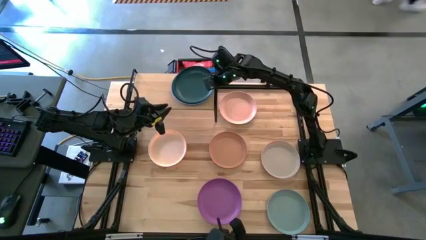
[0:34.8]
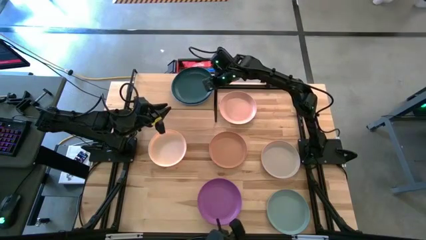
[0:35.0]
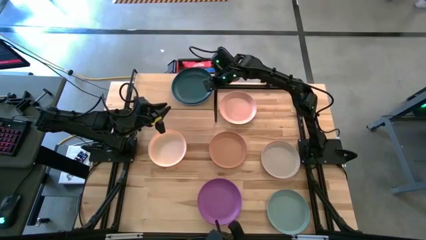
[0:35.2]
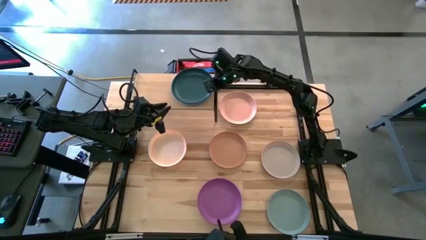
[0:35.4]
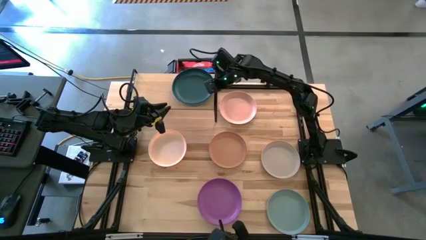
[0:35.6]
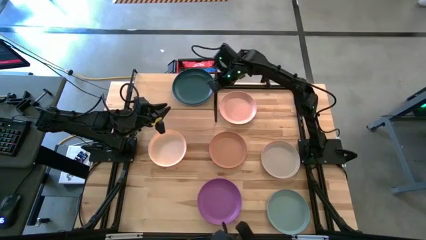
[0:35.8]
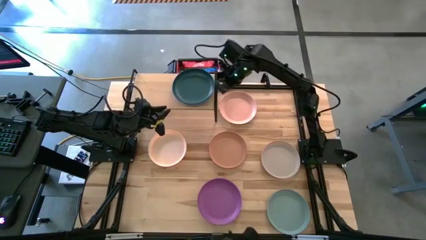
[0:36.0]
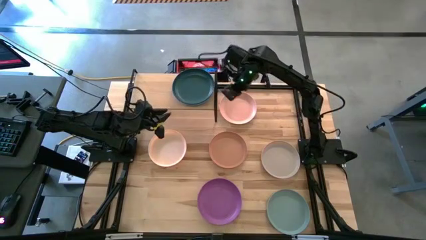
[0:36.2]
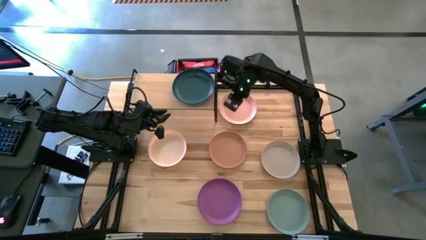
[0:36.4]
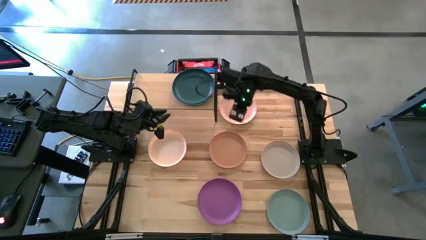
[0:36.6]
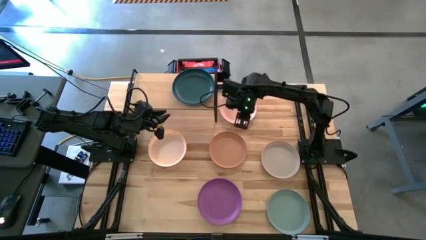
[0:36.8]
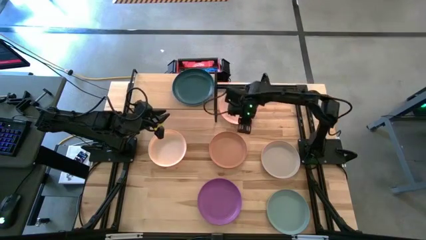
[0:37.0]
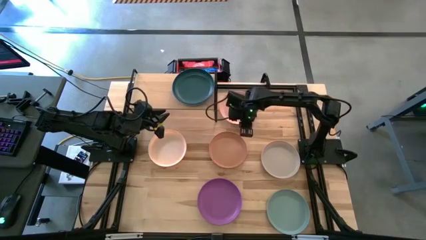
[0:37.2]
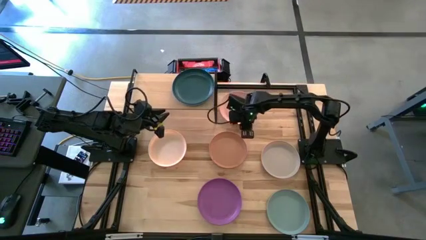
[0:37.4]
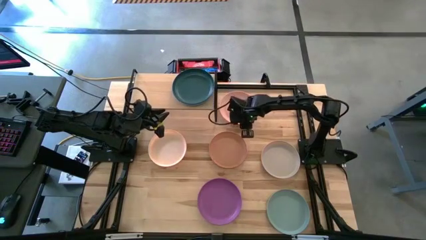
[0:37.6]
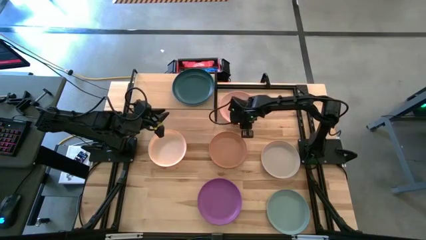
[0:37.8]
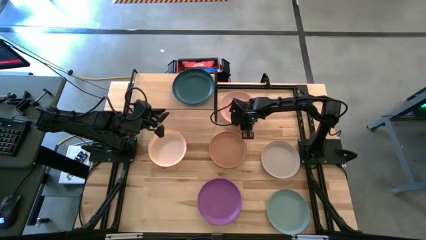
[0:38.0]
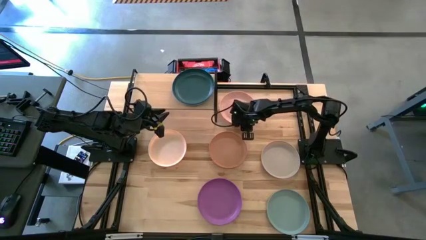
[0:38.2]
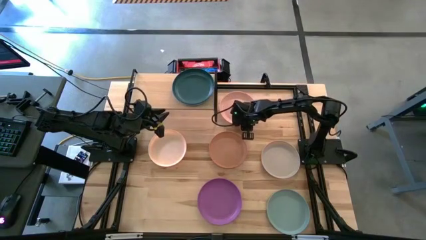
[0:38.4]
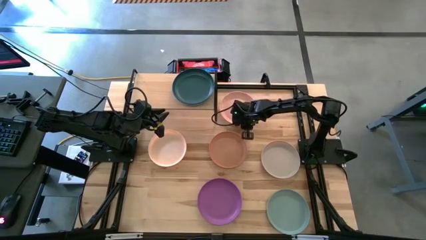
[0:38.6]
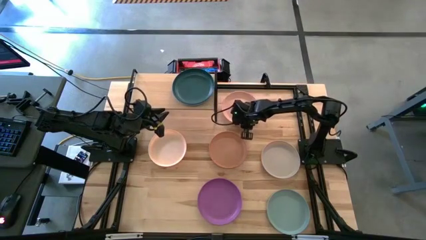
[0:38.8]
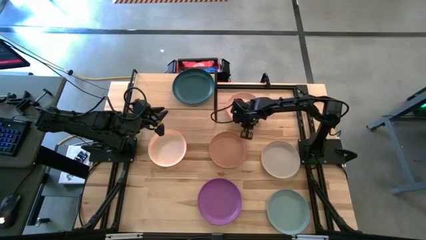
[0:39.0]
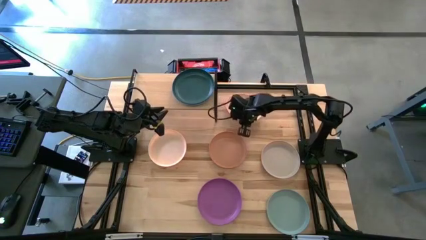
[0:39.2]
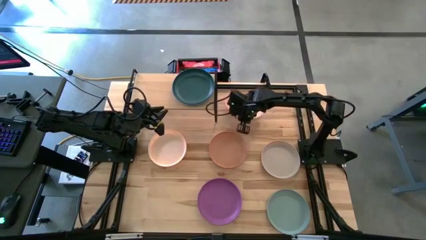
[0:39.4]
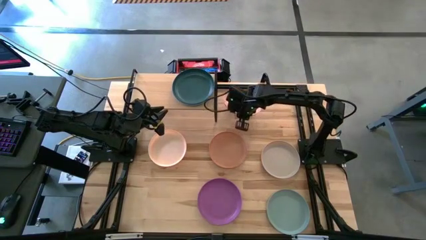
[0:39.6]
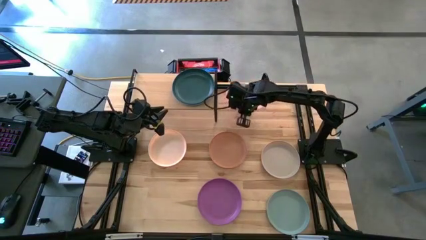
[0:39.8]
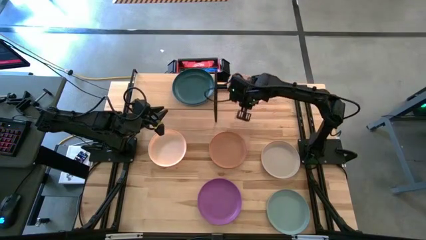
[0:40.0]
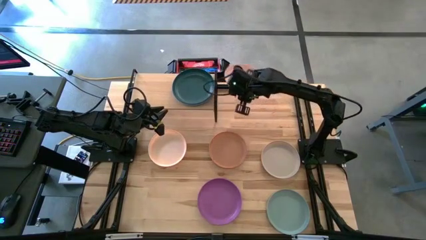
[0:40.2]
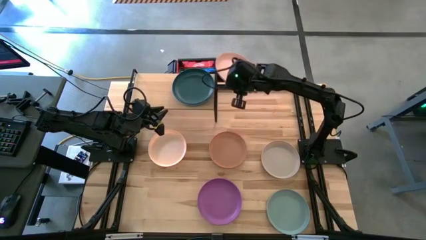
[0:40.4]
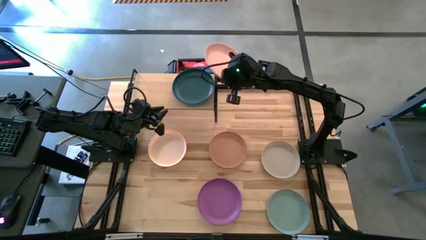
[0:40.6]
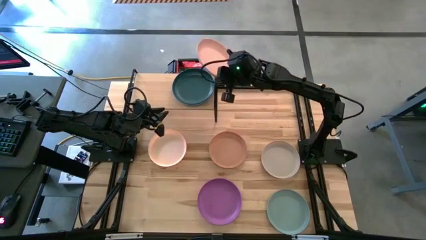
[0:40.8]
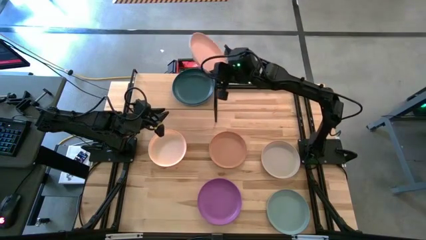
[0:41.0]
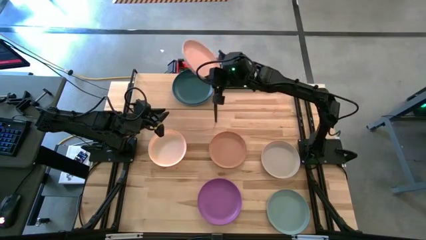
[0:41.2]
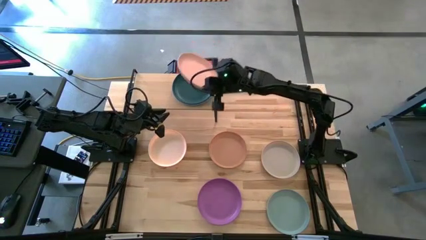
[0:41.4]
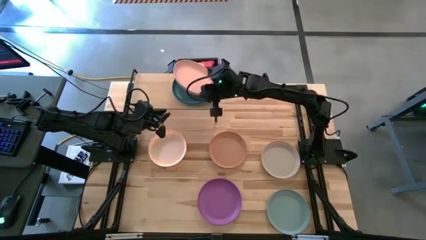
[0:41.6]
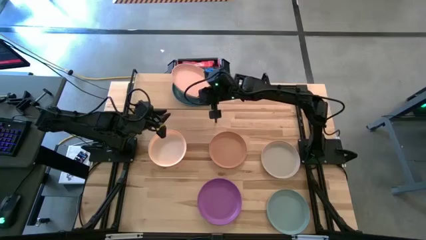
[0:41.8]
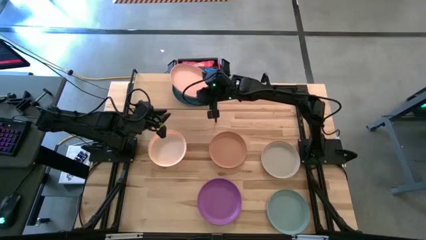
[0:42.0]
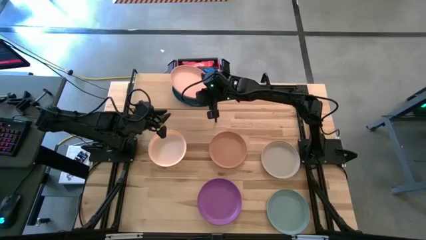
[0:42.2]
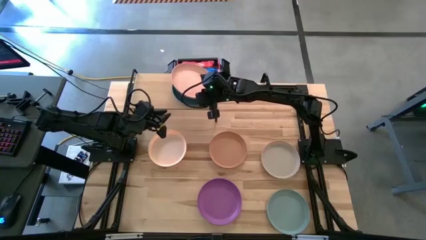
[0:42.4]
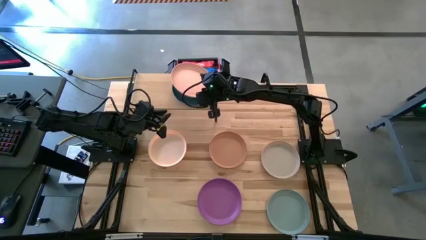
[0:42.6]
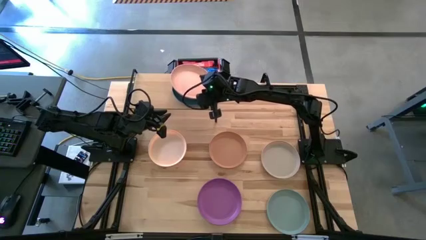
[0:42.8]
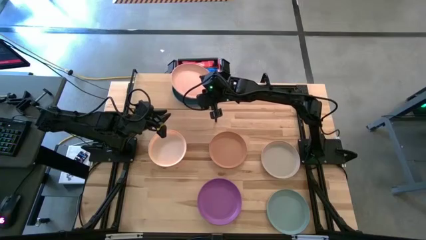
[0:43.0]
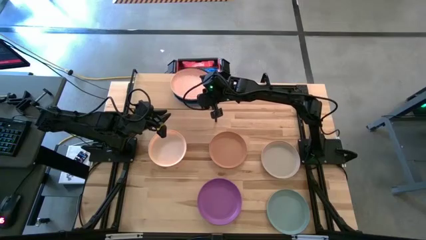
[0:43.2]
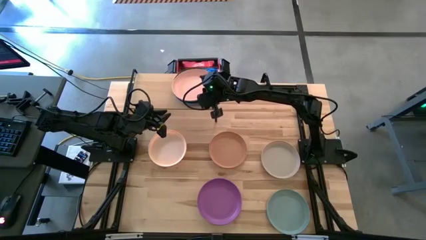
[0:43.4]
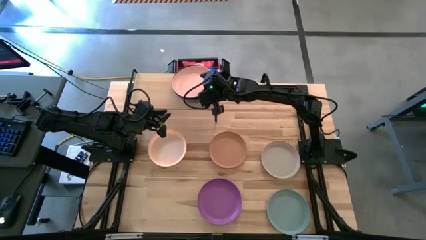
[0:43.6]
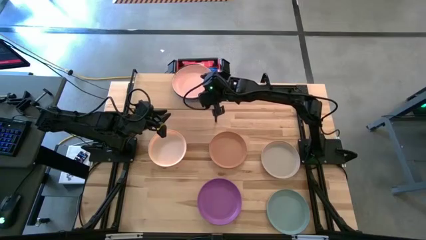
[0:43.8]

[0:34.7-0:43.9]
Task: Place and stack plates onto a shelf
Stack the top light pink plate on top of the dark green plate on the shelf

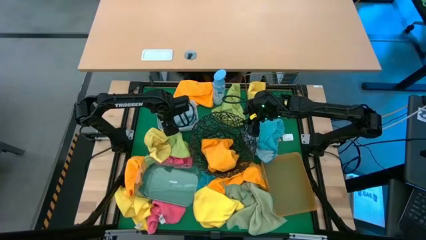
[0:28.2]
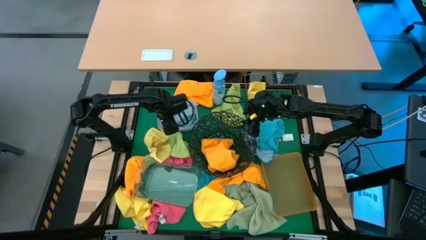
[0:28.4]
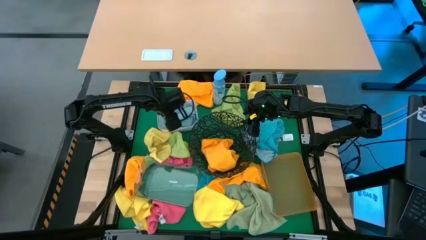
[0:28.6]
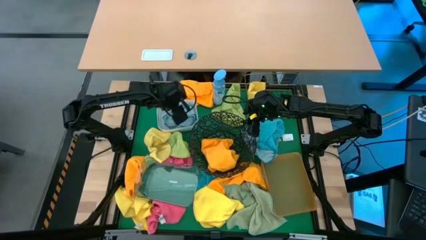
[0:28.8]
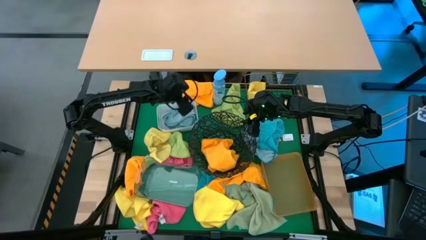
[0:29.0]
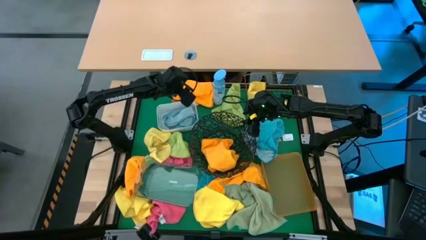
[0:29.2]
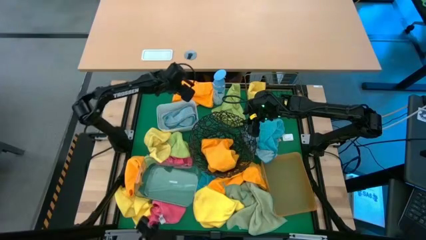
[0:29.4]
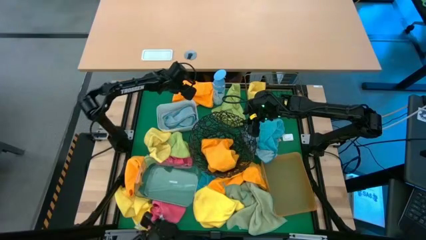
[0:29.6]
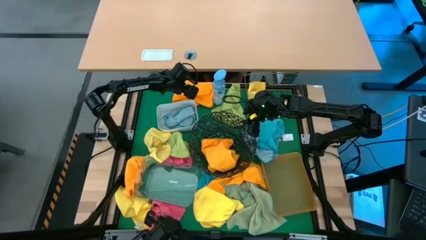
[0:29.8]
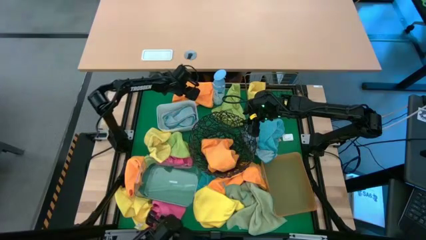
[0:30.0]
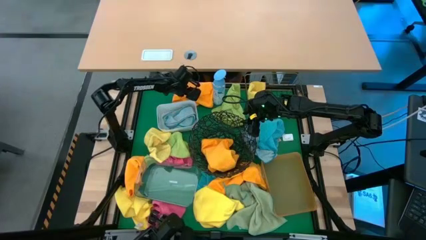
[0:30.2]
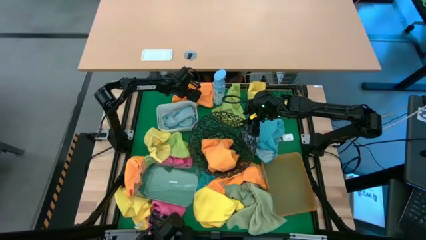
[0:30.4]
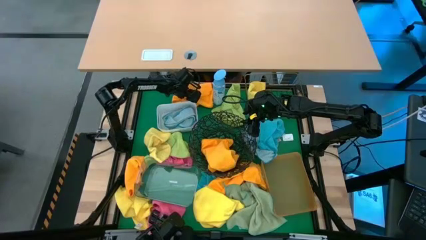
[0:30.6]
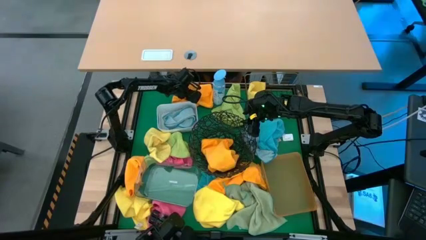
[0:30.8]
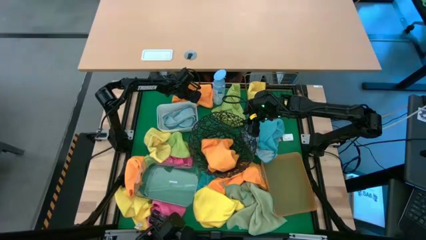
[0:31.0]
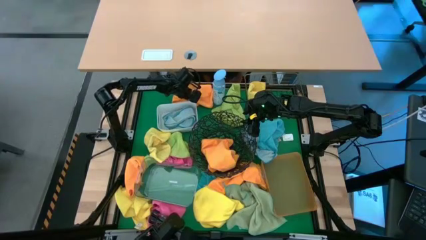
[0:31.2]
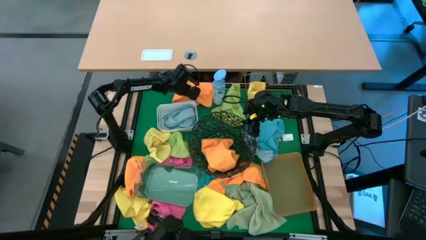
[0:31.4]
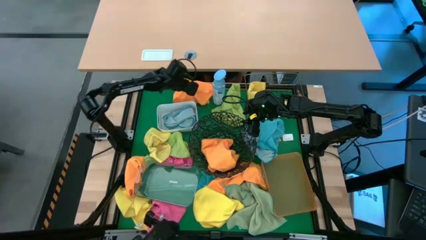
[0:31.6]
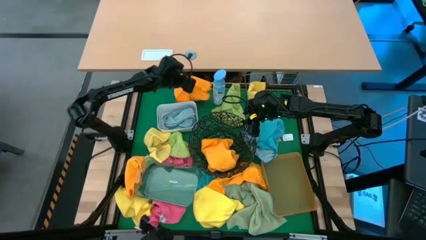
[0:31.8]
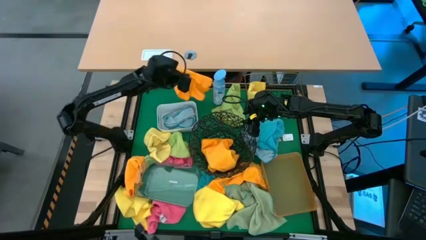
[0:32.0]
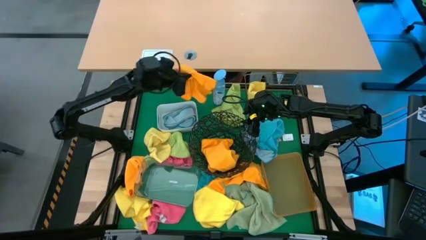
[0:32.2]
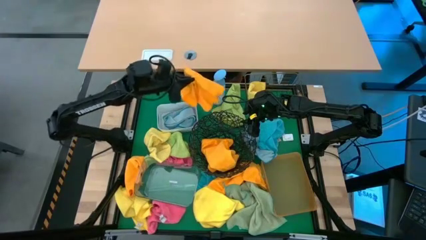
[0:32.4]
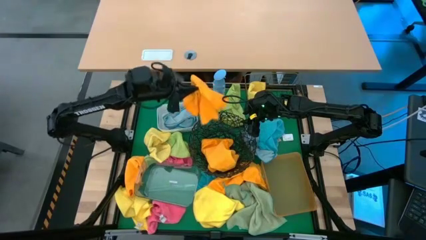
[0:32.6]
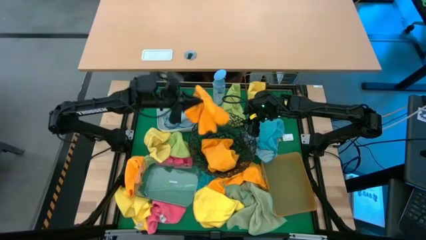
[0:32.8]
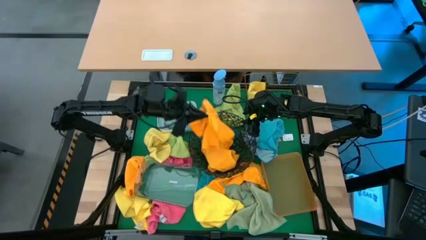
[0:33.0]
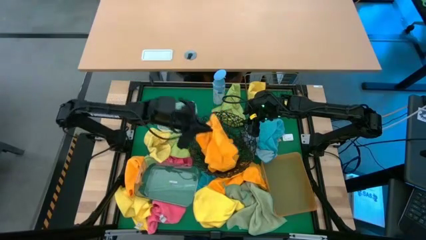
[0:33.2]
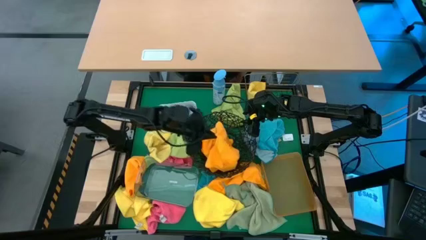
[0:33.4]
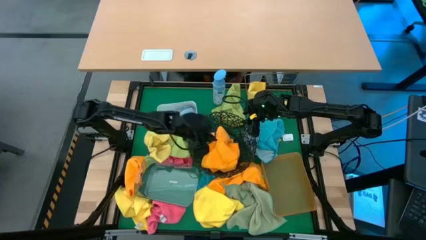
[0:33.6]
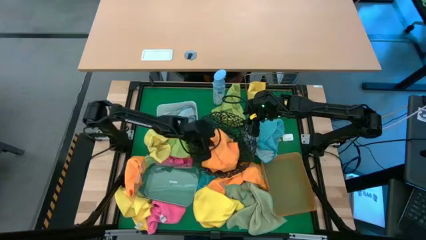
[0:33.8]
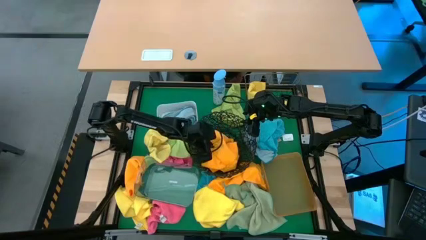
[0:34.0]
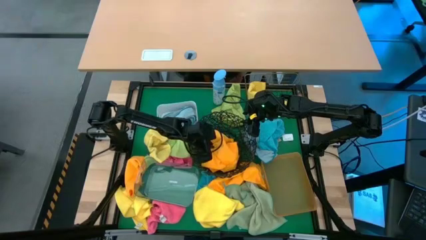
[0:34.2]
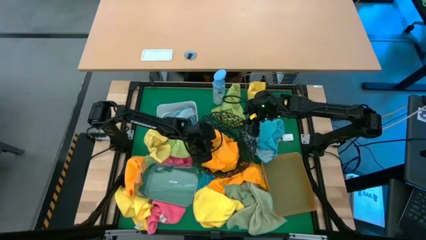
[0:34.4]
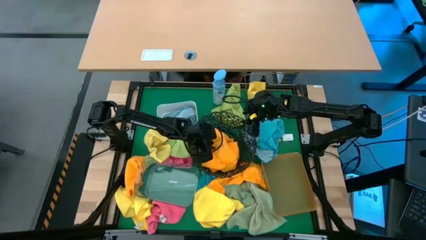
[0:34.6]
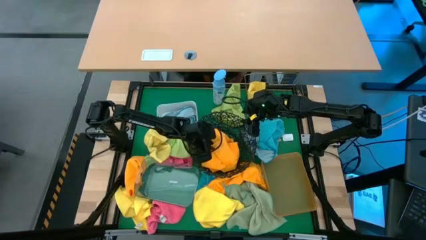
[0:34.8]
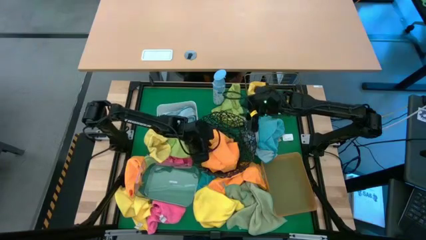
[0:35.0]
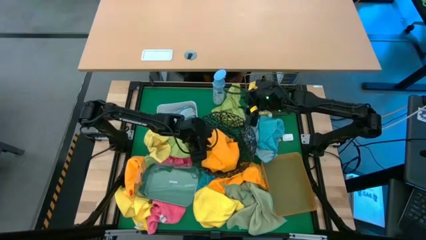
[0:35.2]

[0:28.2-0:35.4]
Task: Sort microfiber towel by color & place in baskets
Put the orange microfiber towel into the circle wire basket
